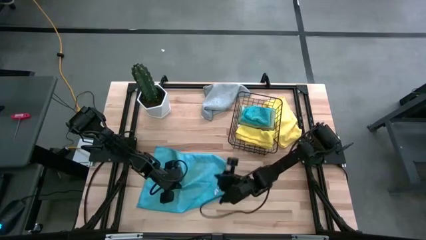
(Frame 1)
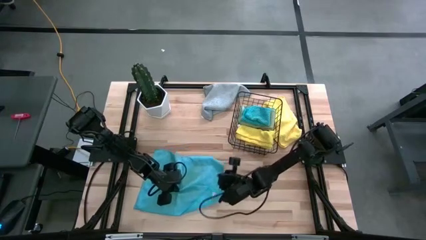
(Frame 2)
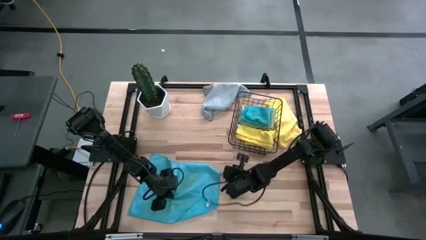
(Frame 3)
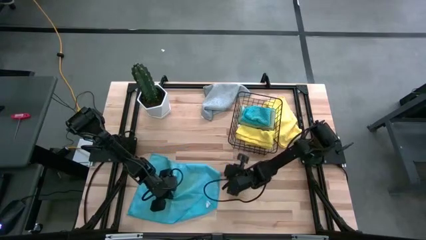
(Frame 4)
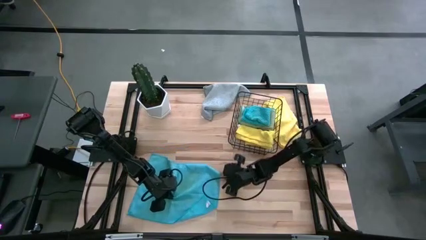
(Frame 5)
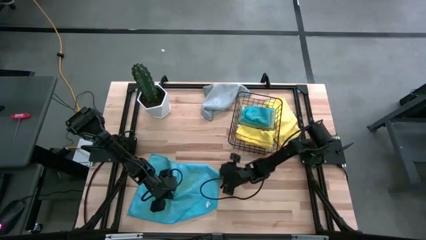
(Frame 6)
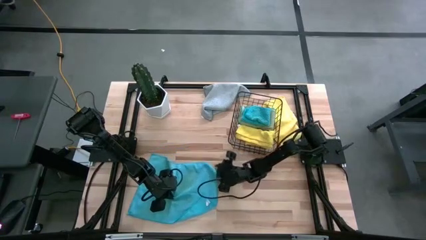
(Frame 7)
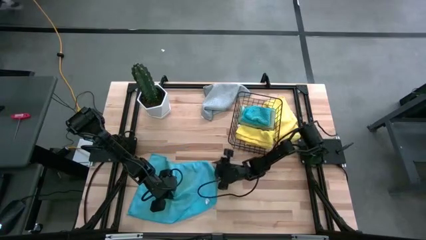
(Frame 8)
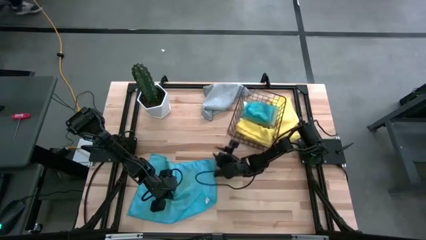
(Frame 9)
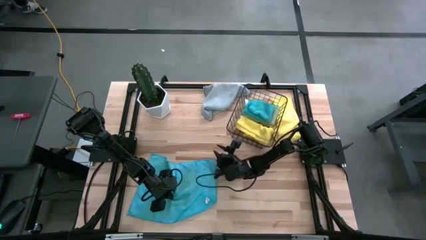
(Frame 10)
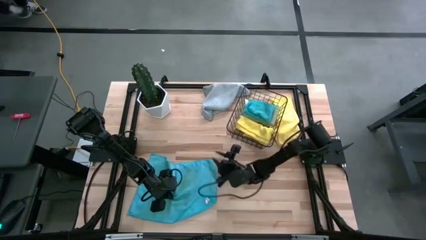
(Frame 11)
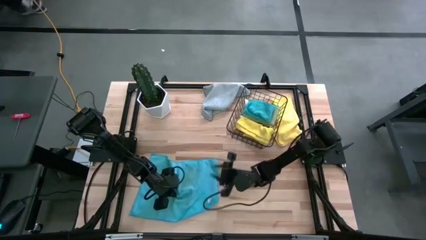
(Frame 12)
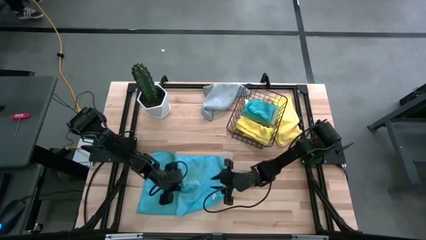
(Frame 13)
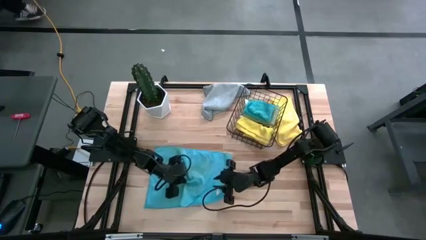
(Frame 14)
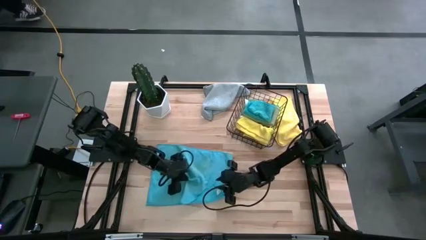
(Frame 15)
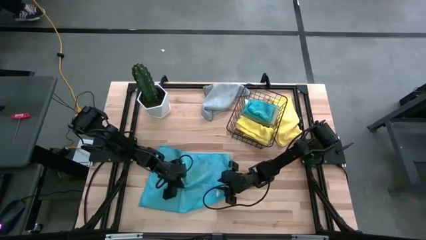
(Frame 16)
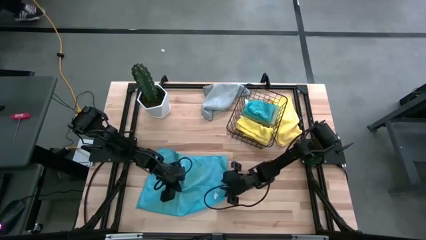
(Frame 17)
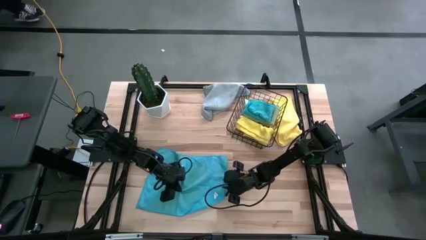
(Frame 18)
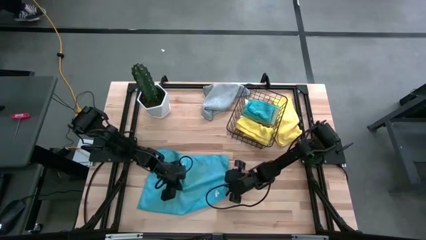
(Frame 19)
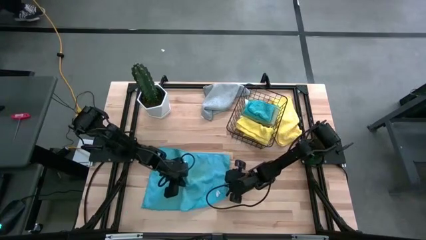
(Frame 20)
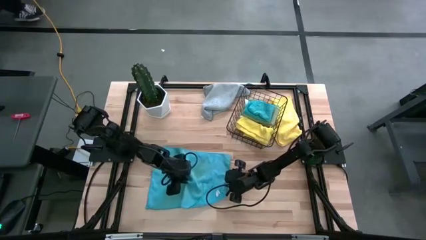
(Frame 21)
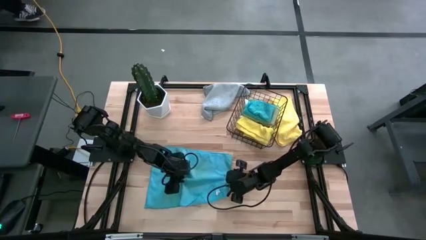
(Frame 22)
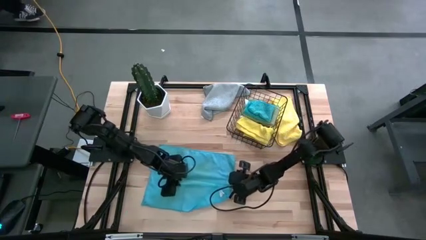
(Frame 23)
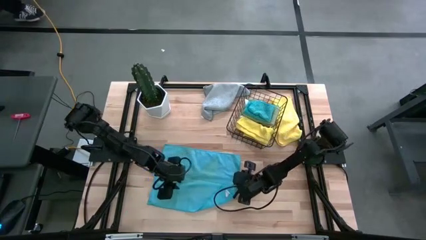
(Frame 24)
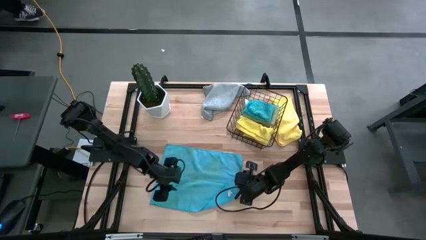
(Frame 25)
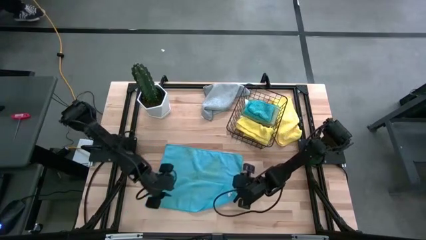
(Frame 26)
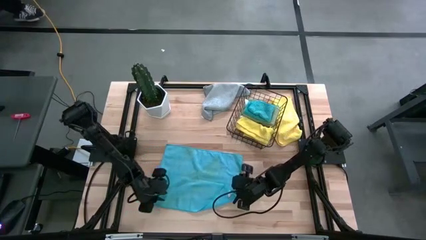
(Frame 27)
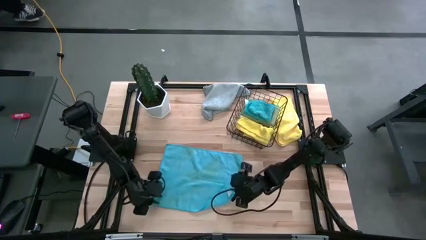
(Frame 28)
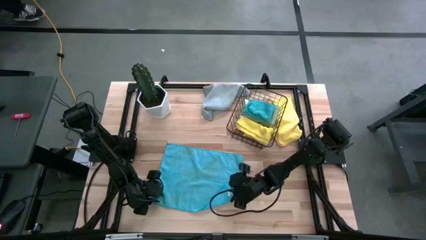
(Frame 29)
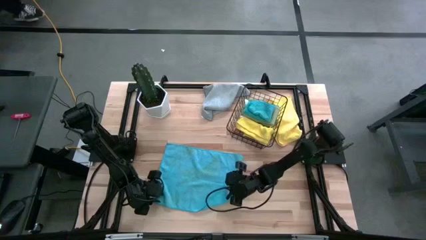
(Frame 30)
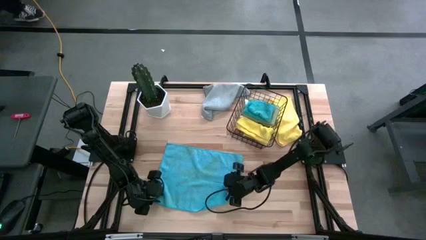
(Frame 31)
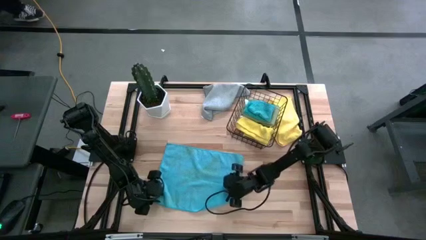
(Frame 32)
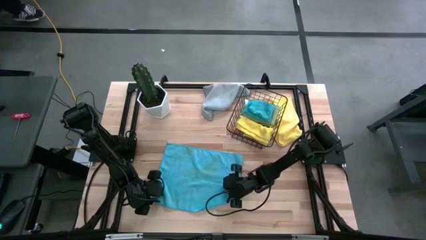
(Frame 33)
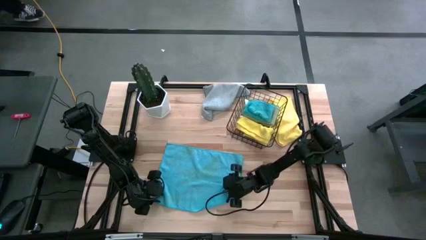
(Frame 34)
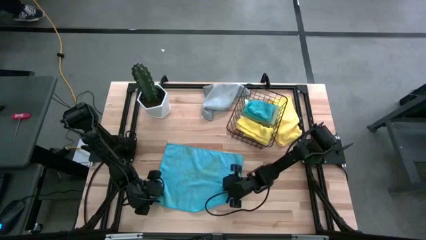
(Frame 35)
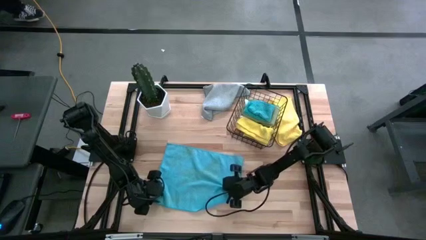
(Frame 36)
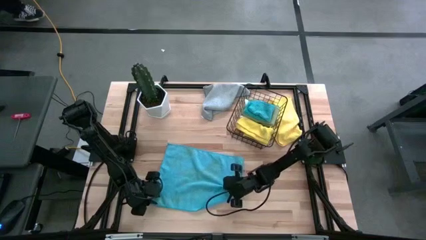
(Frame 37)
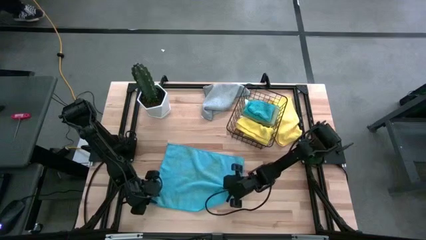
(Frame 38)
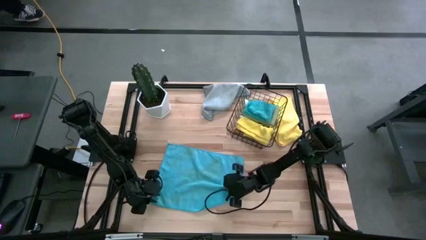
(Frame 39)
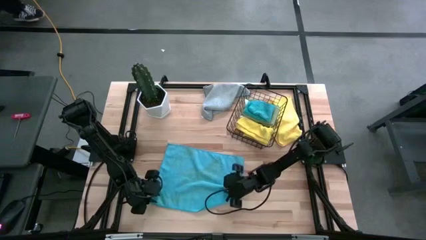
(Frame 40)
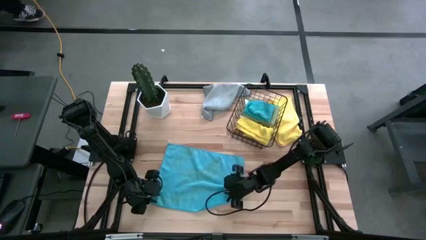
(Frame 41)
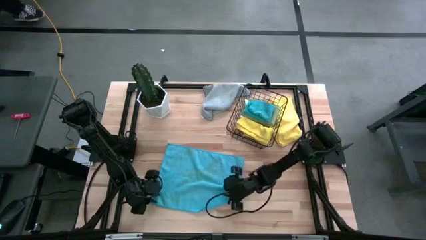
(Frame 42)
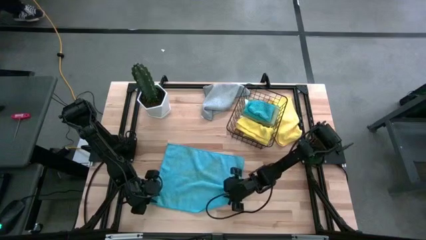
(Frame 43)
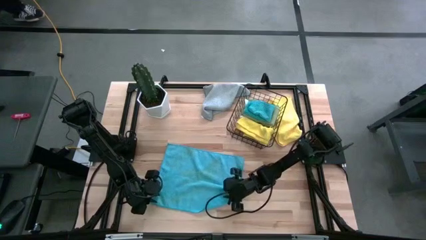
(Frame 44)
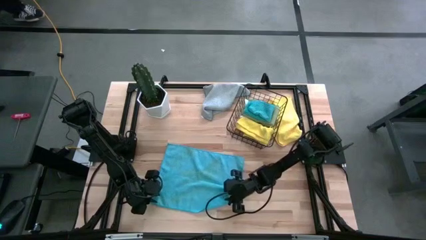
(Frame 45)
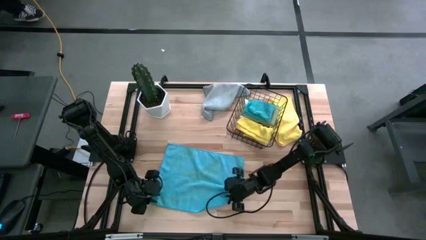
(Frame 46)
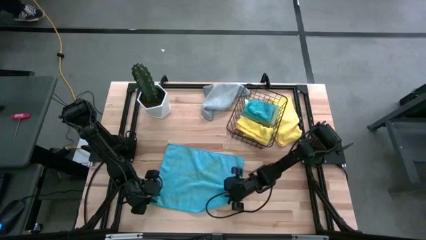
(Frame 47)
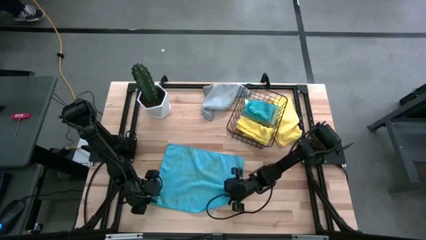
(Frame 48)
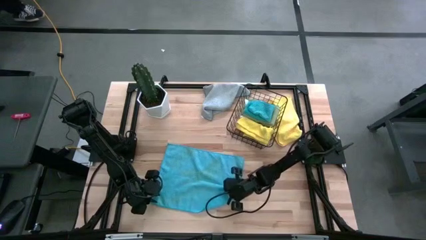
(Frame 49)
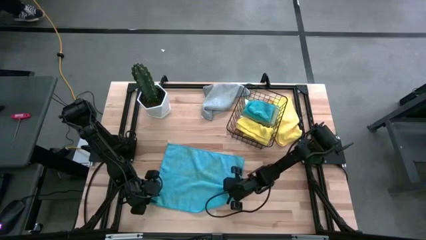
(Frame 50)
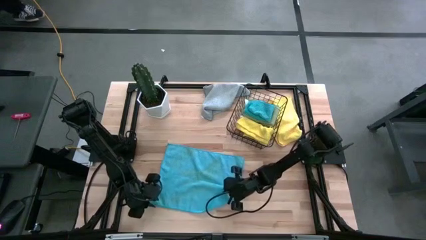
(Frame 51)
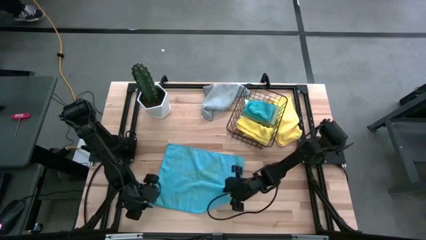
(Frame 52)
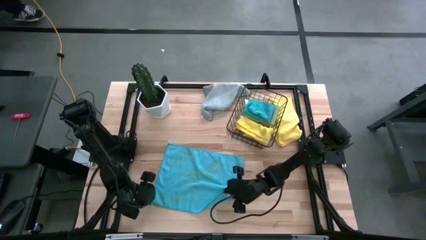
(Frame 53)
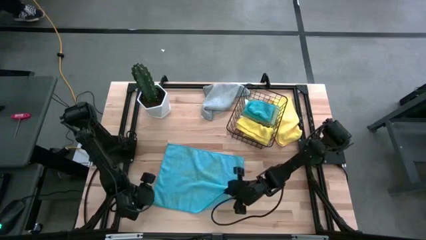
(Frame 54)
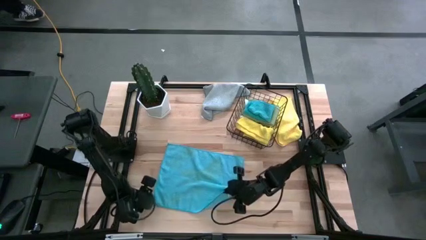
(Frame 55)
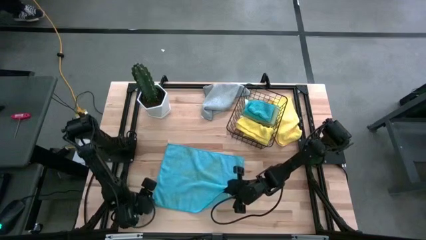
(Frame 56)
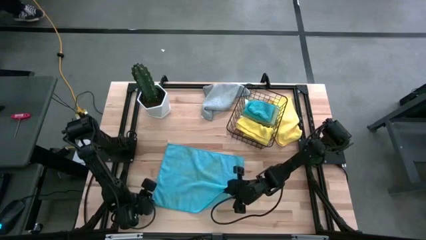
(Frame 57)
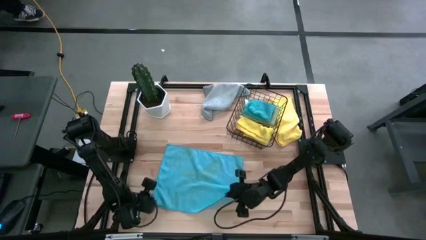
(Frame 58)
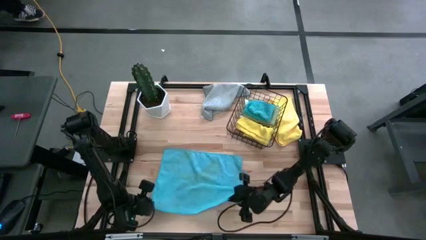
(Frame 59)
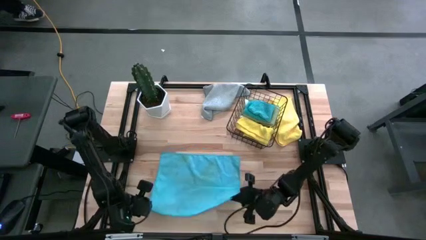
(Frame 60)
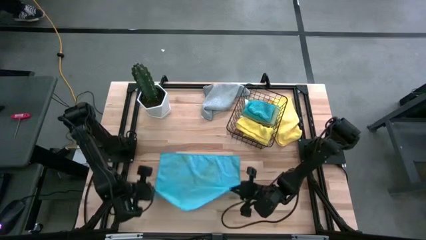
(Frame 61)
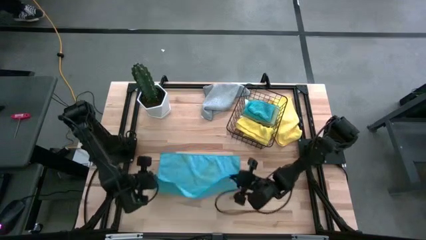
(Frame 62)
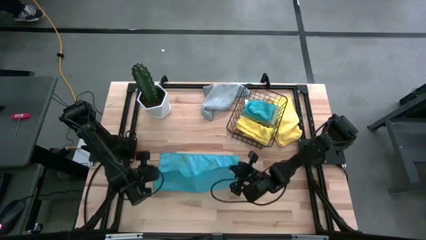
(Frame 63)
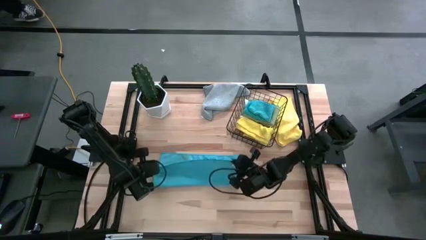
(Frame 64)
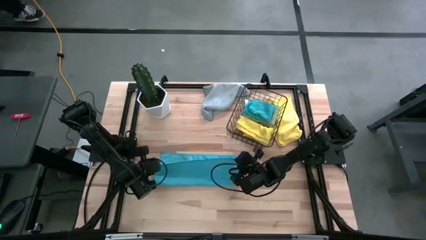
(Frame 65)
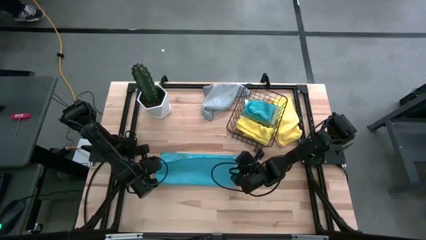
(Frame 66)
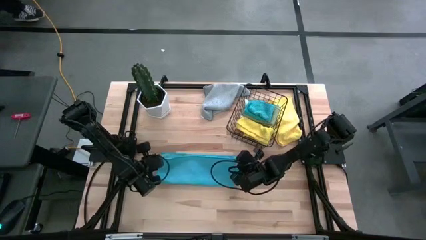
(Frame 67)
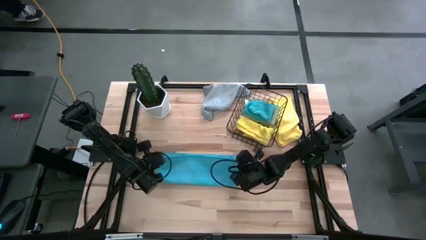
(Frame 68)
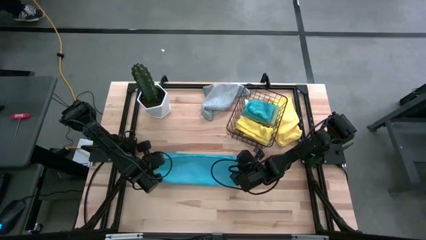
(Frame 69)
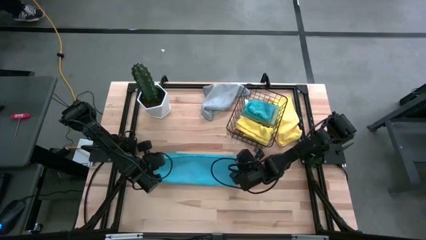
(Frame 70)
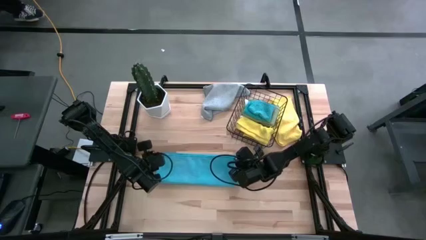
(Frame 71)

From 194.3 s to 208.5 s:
Task: Fold microfiber towels
Fold the blue microfiber towel

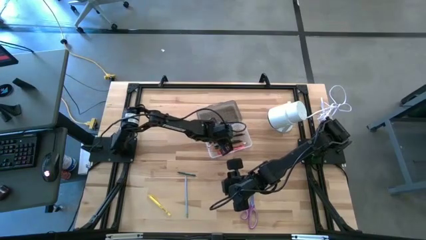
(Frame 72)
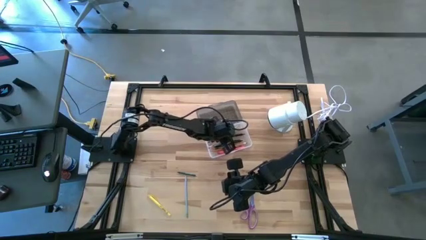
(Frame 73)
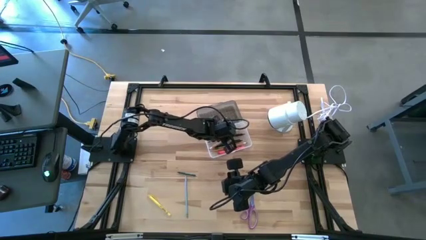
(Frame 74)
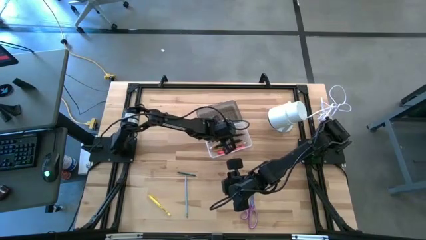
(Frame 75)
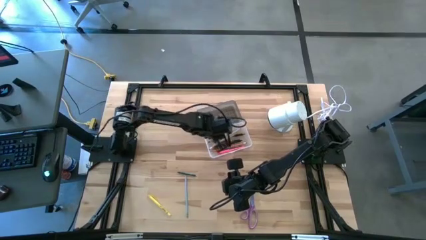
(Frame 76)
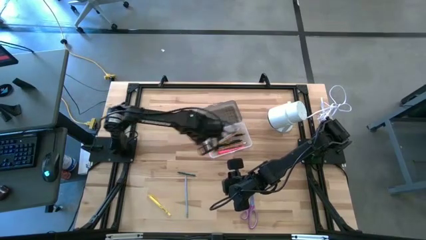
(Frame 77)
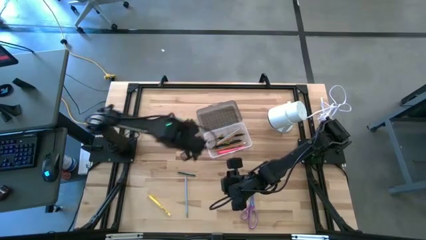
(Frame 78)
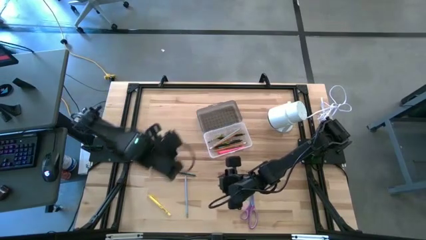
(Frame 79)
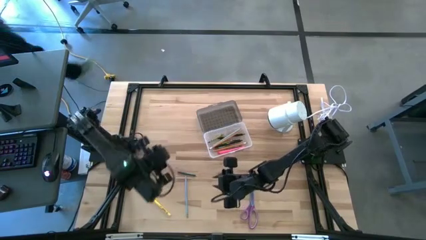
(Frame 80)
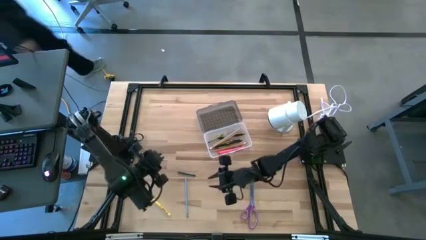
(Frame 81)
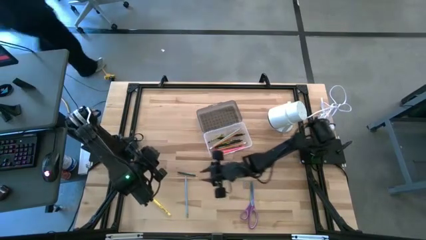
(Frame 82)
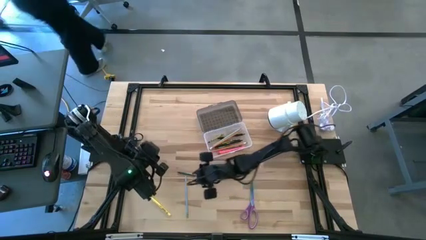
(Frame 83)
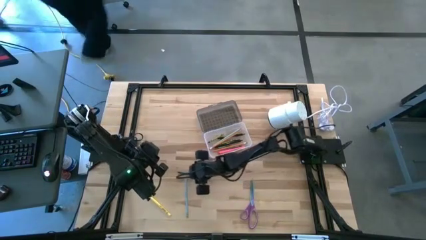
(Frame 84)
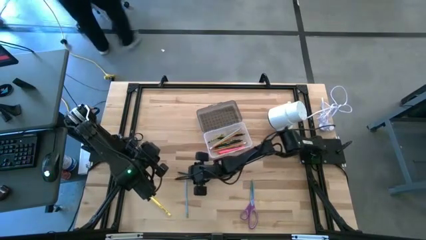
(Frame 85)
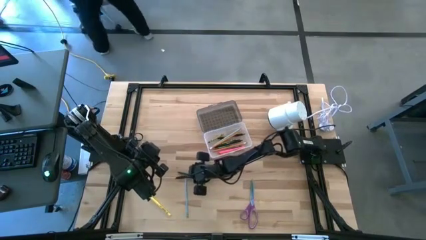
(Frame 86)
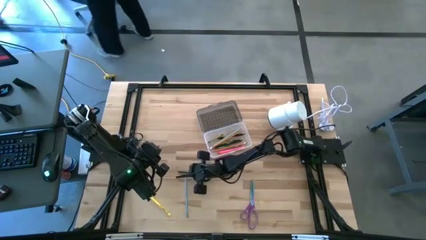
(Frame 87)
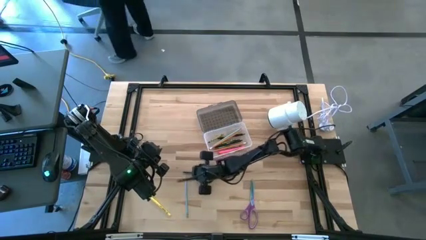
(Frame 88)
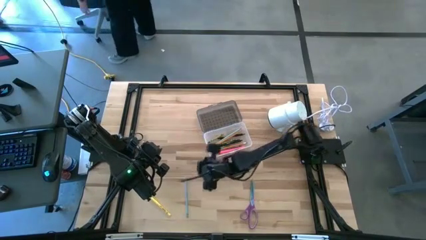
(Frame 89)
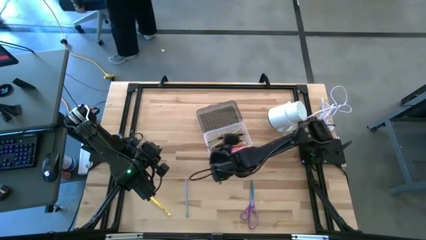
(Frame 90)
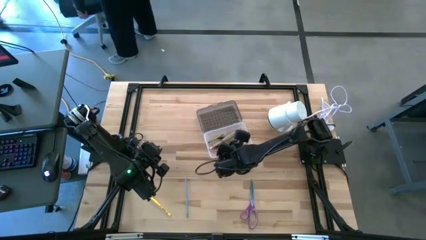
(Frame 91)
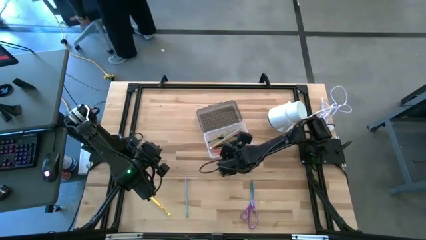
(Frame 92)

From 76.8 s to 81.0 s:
Task: Pick & place school supplies into a supply box
Put the green crayon into the gray supply box
